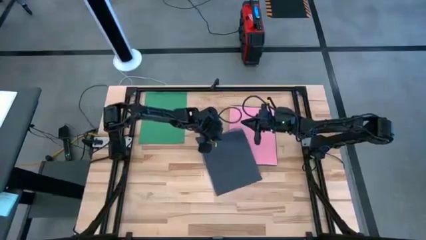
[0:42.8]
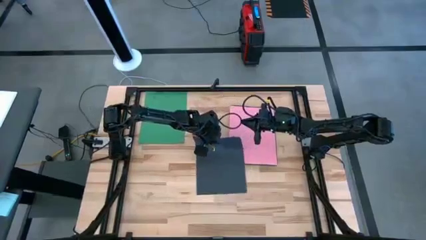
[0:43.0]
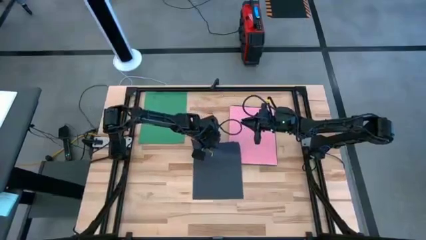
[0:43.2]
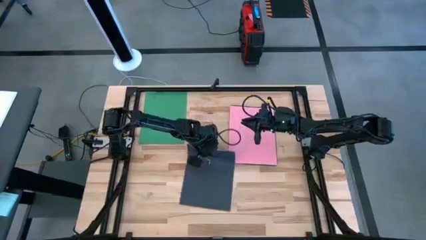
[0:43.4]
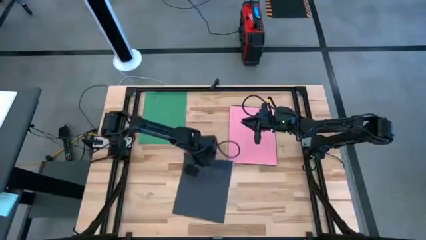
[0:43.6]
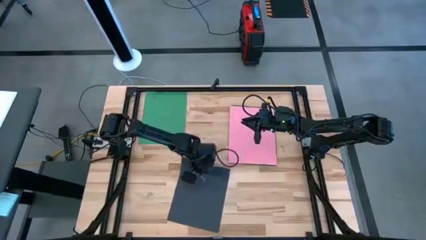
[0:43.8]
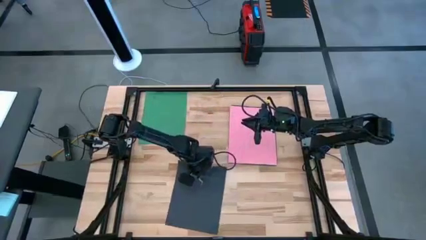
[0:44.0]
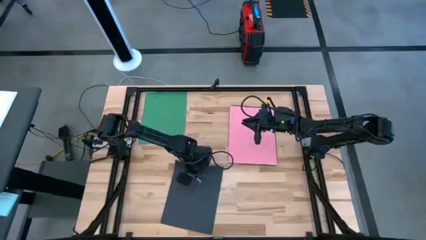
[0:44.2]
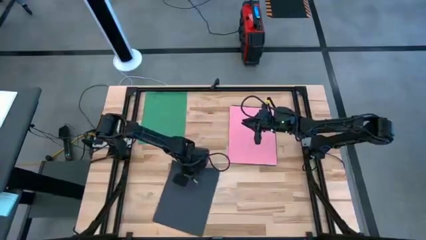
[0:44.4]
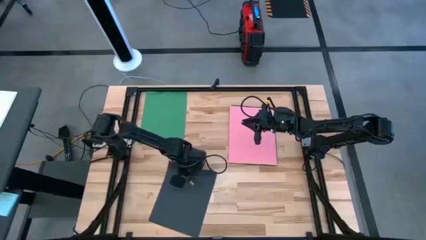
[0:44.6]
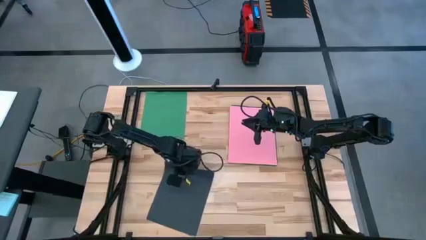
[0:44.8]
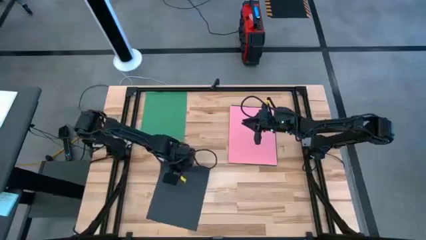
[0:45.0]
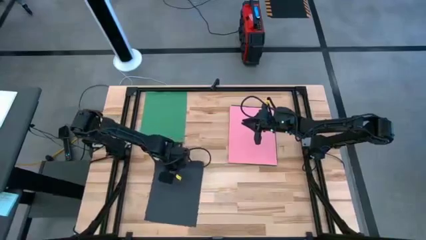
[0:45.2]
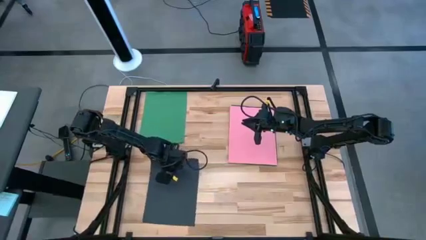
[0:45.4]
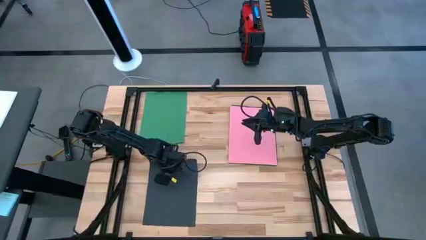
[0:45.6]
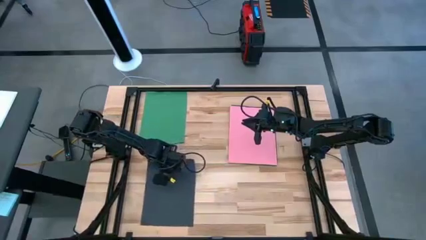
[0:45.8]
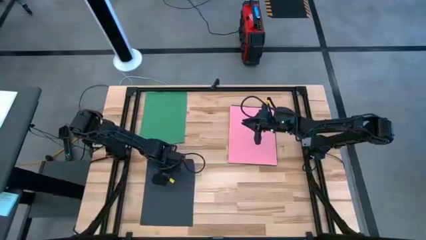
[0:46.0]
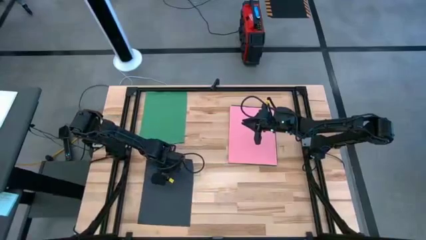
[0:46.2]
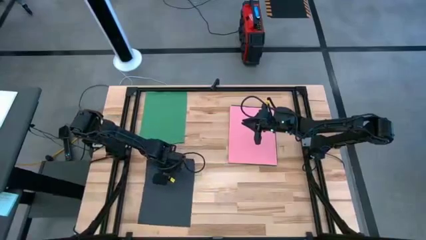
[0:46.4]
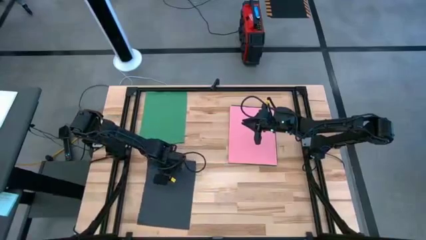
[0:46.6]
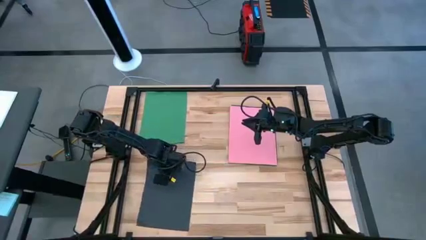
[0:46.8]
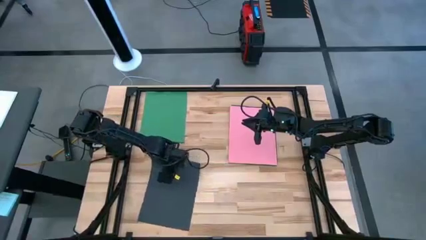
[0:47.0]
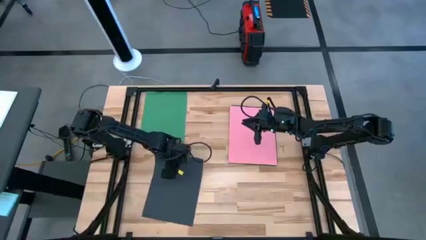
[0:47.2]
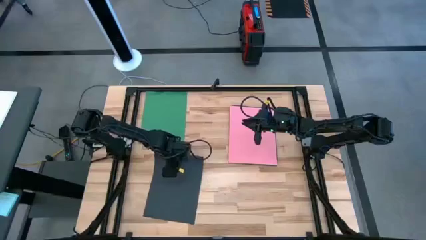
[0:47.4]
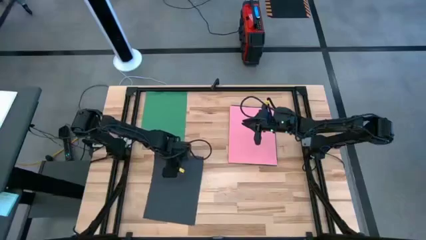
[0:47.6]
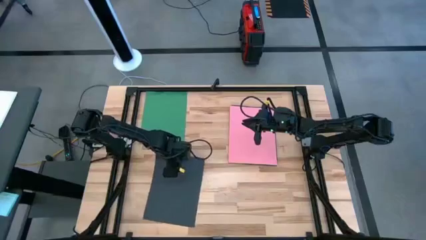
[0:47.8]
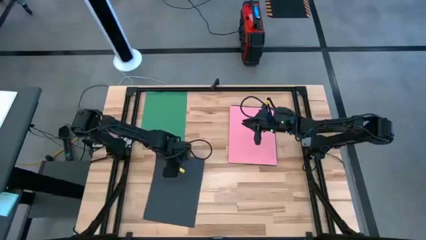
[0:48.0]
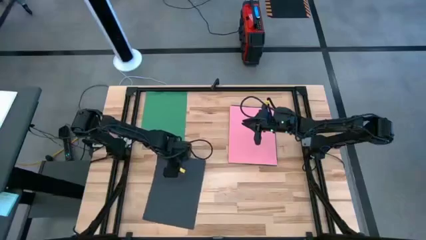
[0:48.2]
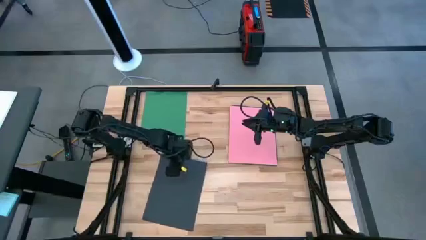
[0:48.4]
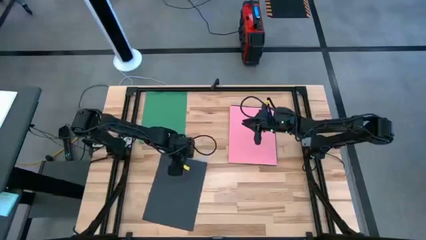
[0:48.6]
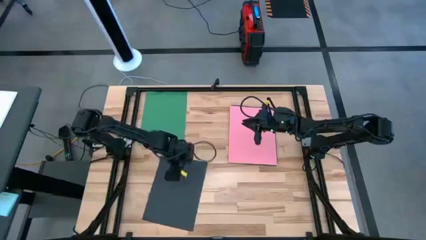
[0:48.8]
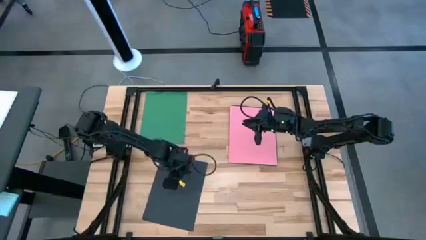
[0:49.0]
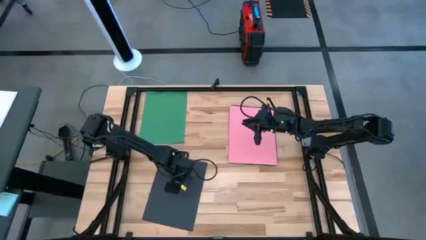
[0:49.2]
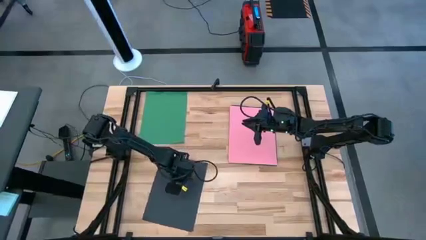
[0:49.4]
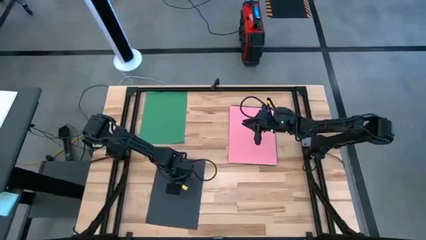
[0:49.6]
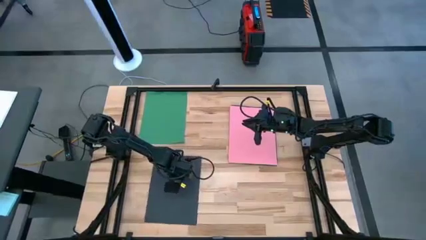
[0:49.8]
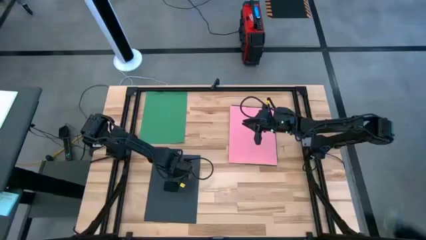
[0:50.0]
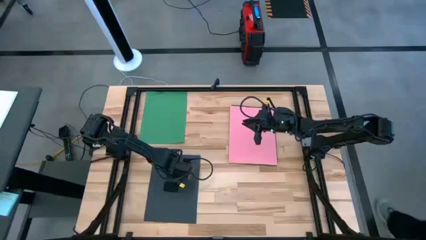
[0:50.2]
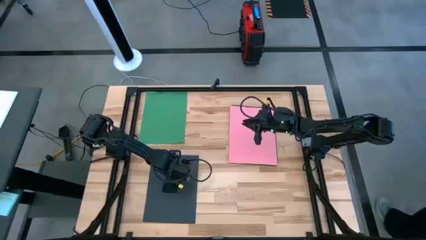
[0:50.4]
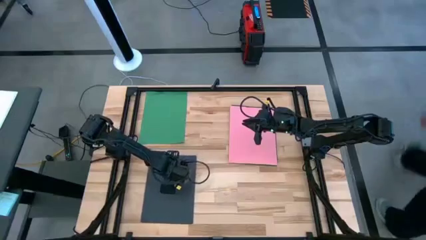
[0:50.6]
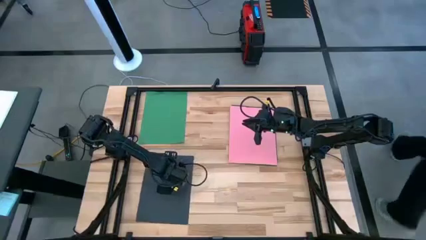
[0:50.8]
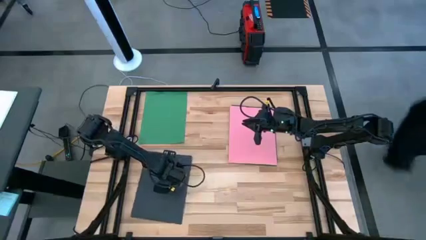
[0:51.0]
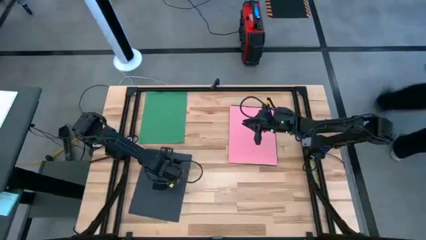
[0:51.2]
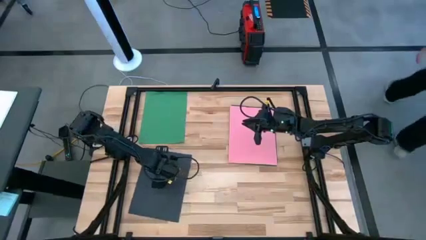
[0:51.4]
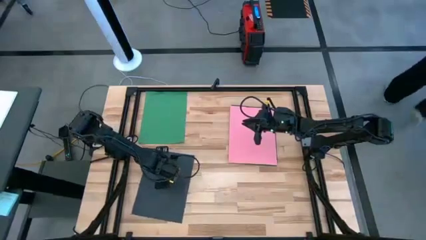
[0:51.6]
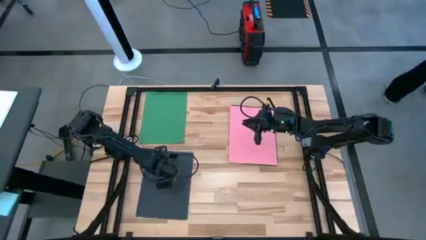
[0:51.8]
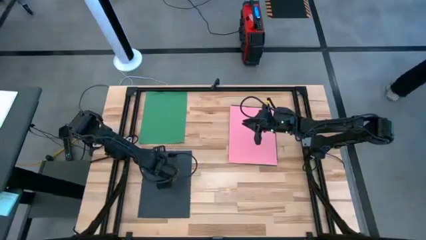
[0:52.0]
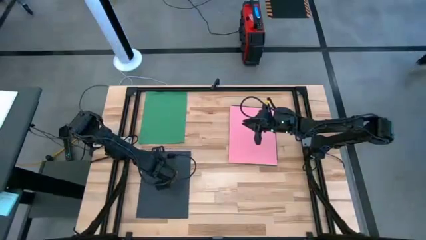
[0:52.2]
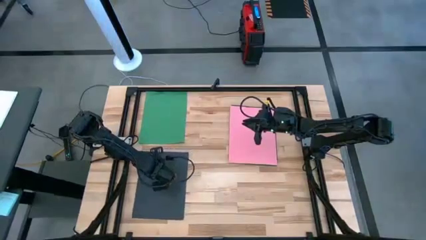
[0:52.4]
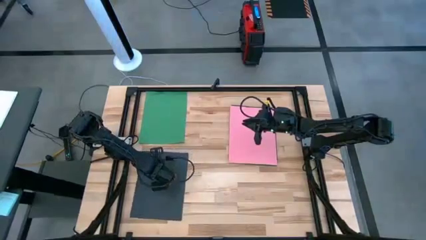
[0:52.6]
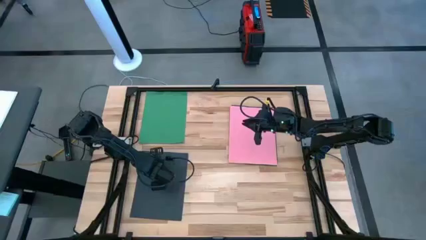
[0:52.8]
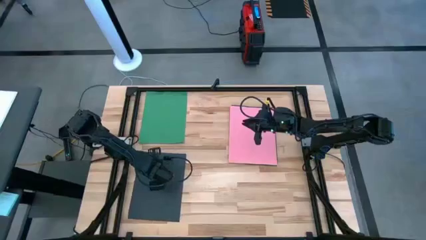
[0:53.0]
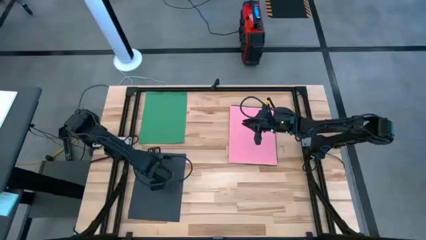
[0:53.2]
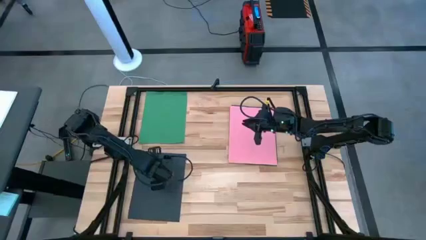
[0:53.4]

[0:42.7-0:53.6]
Task: Organize paper
Move the black paper to the bottom left of the table

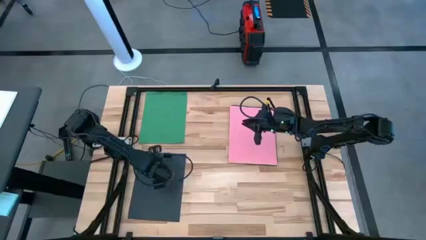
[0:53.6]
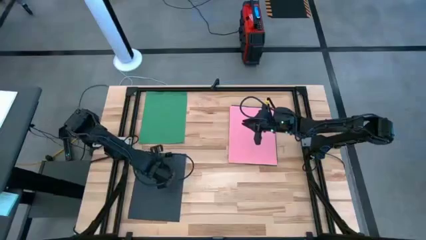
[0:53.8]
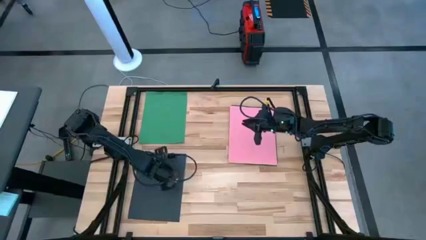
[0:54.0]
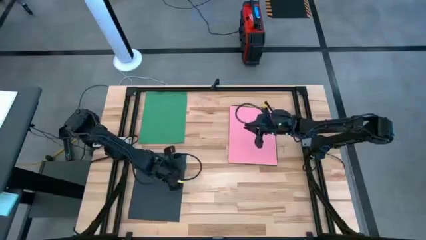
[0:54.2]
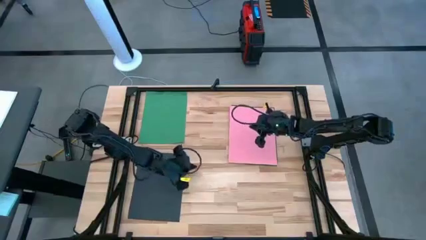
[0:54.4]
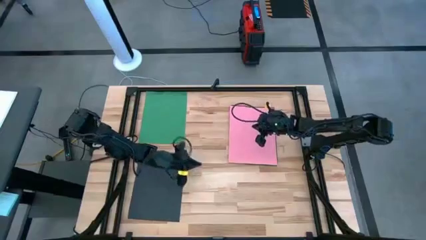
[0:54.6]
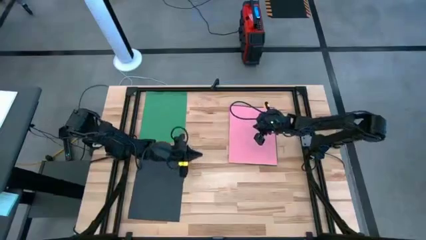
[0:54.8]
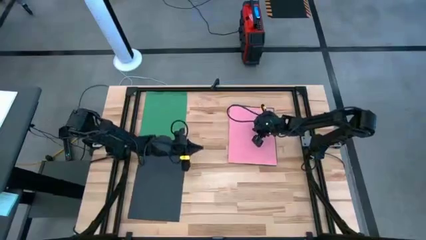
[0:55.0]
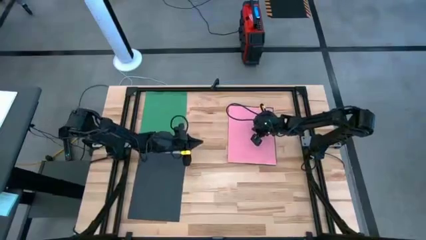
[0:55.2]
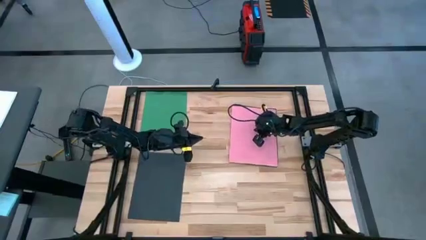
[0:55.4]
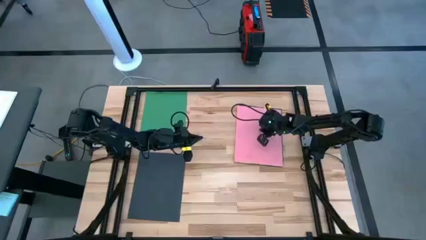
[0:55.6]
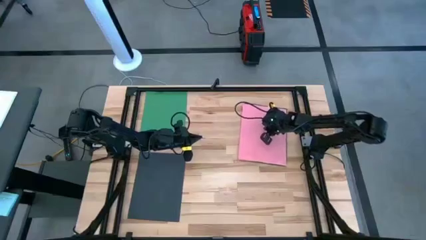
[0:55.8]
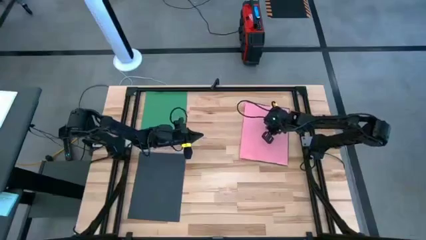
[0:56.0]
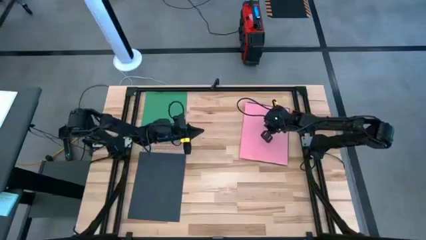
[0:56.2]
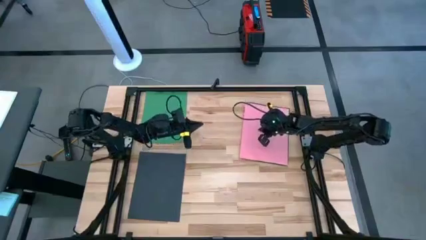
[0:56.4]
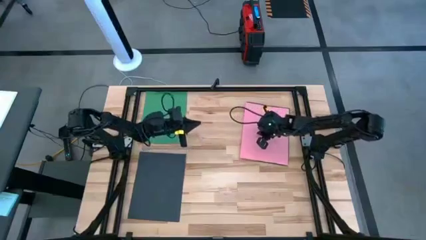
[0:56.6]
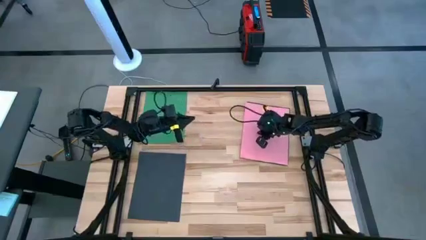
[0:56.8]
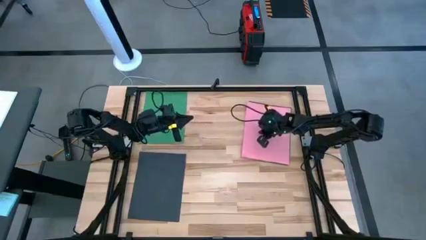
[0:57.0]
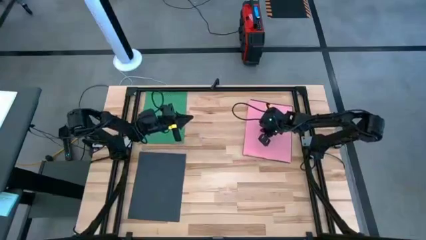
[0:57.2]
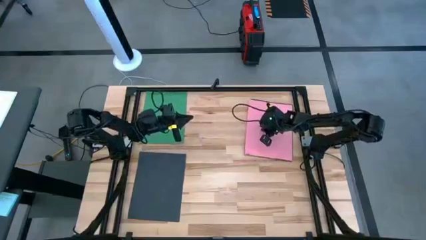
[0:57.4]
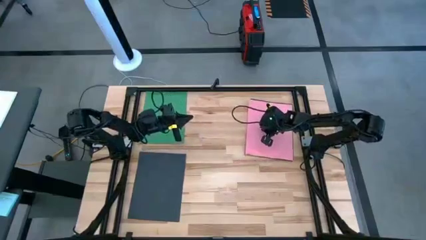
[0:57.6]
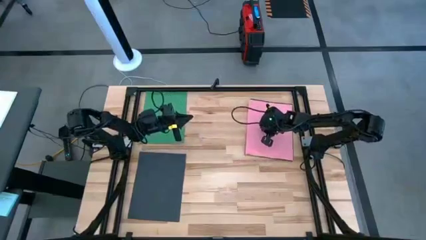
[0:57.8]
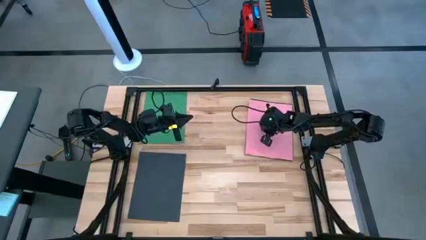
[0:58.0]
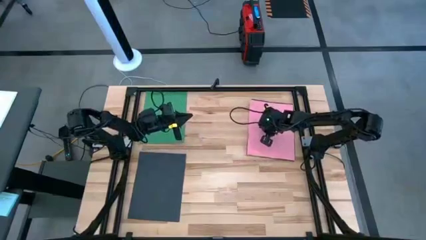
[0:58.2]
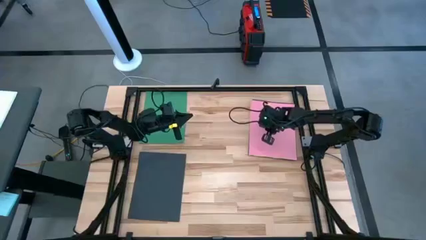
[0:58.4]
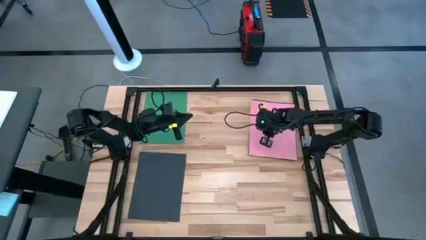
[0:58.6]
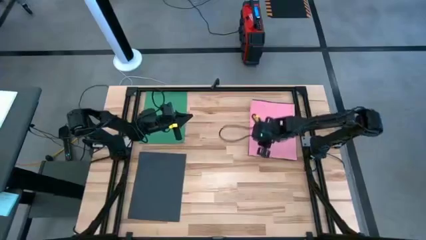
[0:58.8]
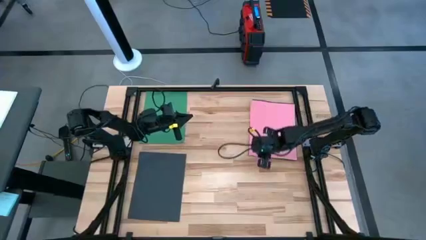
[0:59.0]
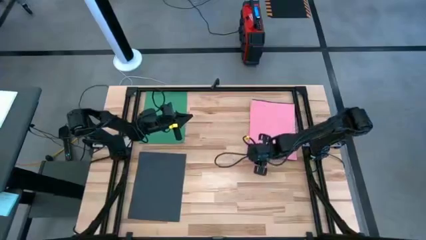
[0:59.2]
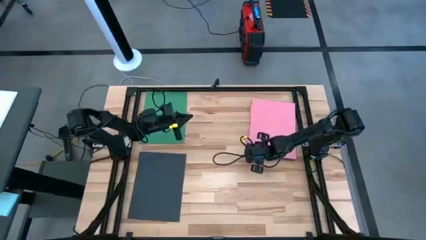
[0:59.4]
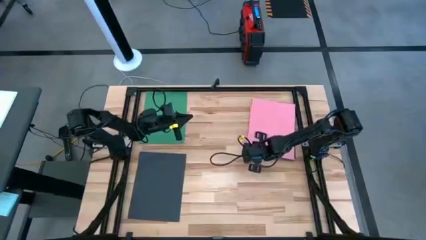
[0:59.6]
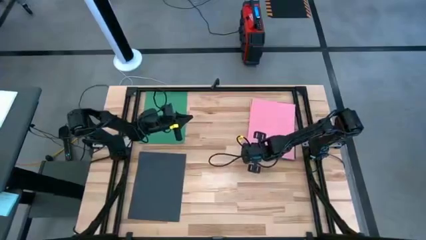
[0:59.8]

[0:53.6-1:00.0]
Adjust the stacked papers to the top right of the table
